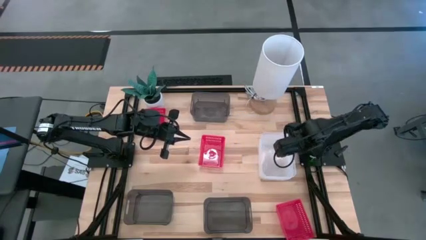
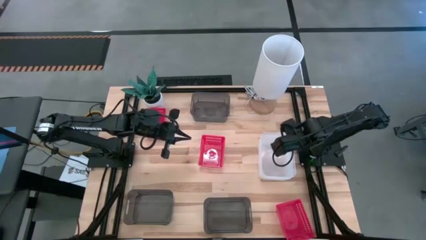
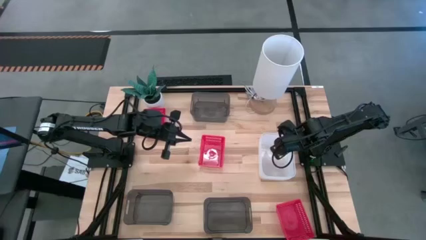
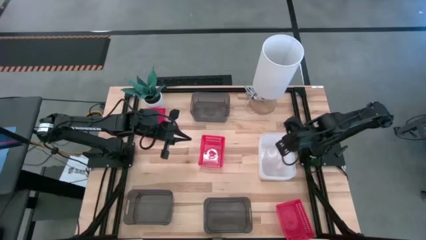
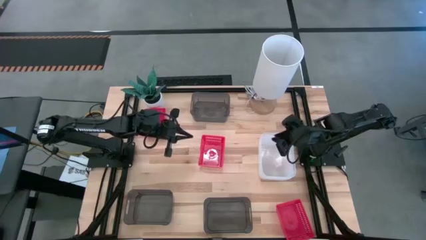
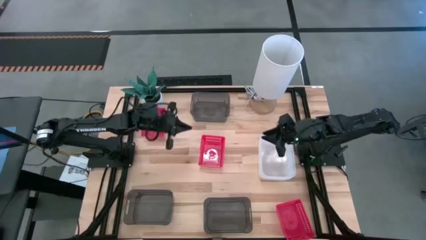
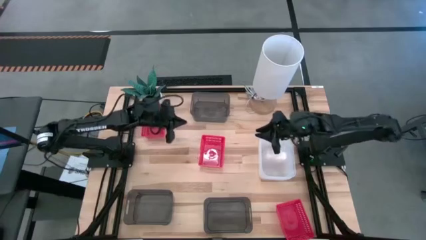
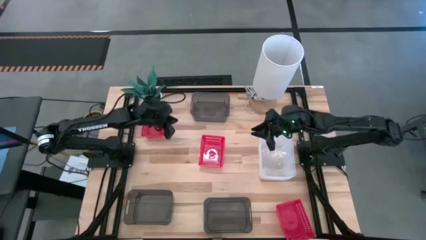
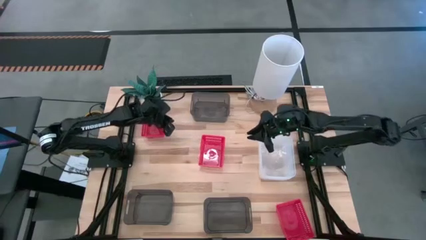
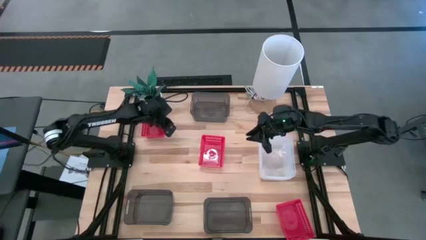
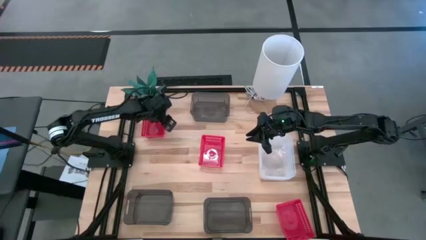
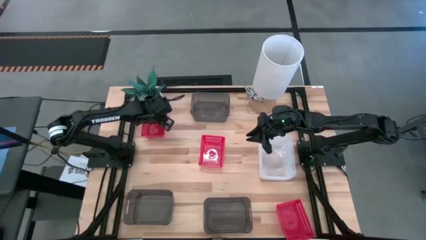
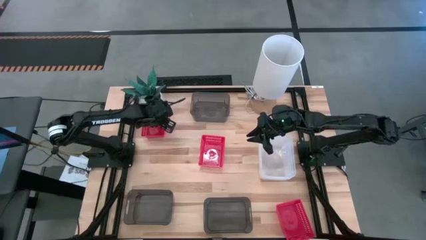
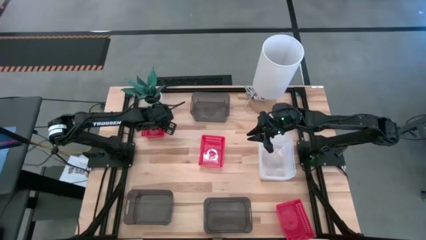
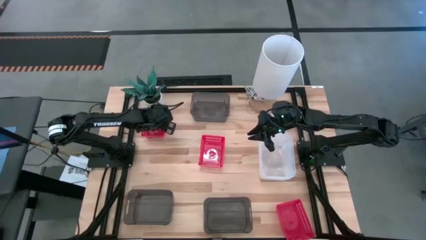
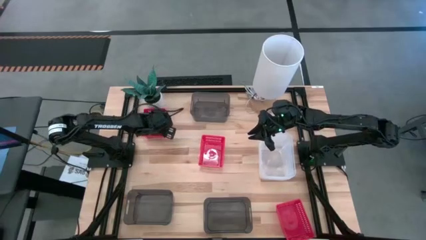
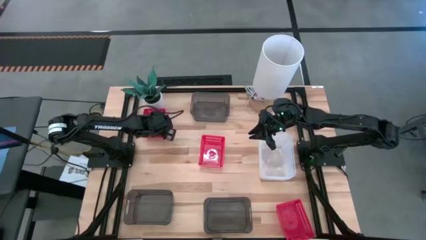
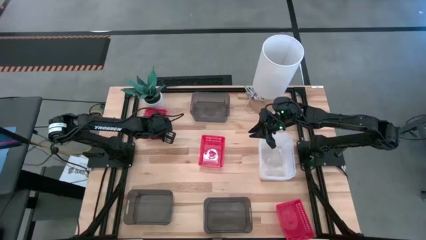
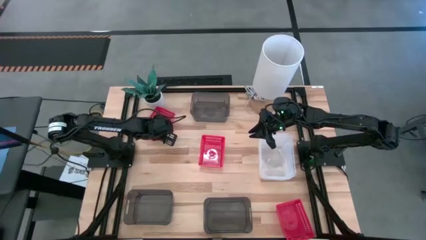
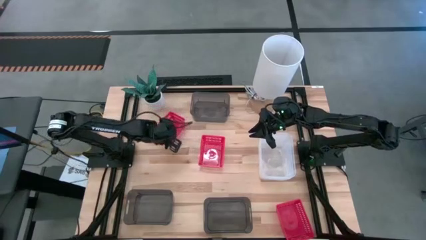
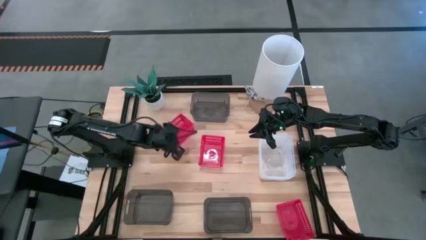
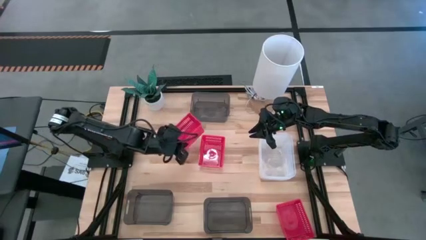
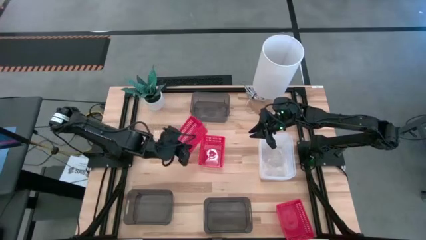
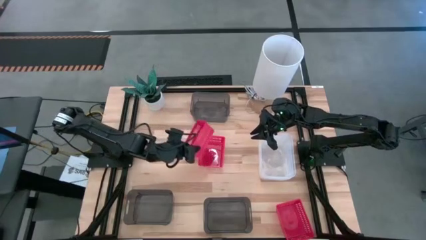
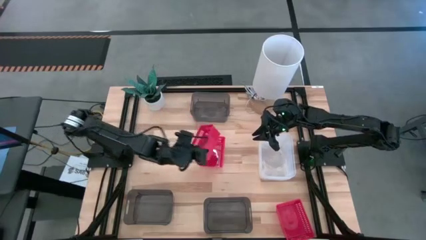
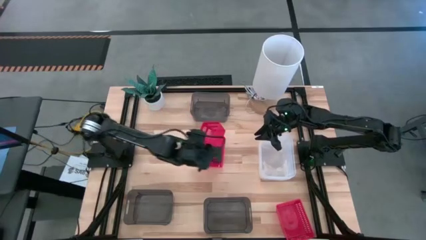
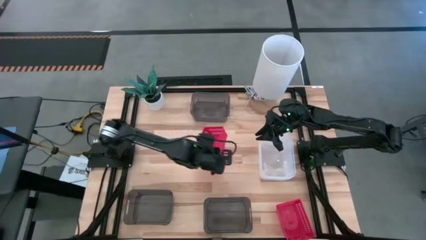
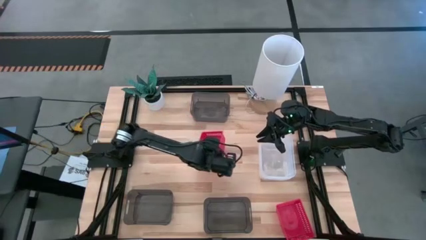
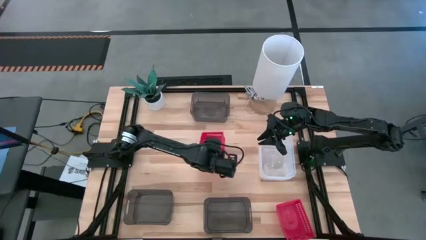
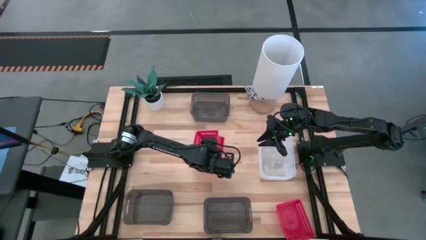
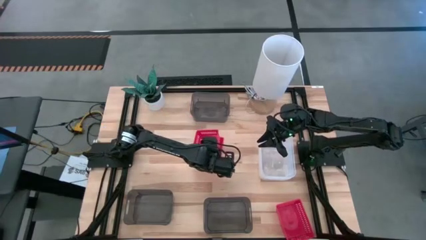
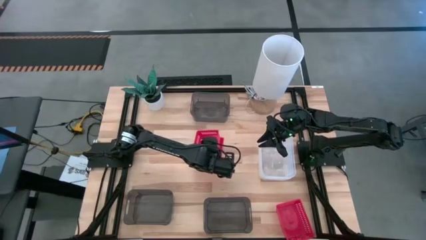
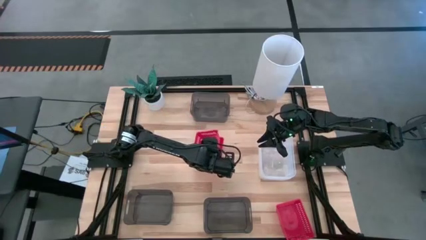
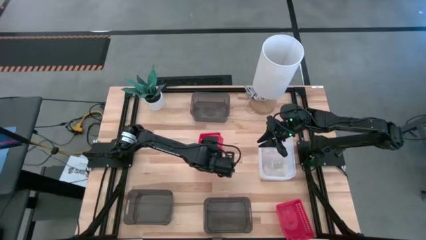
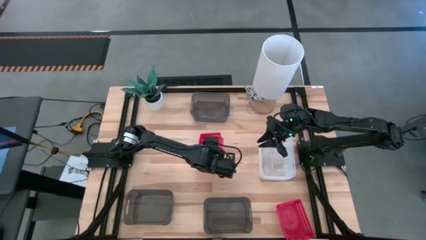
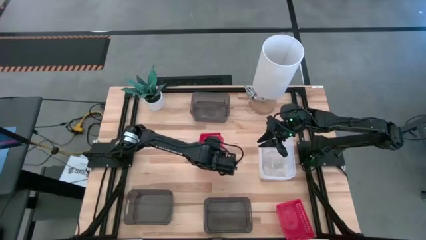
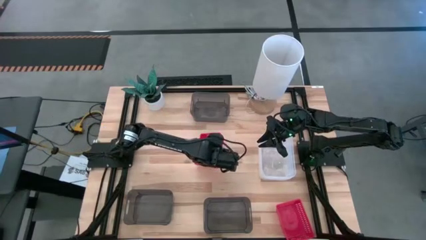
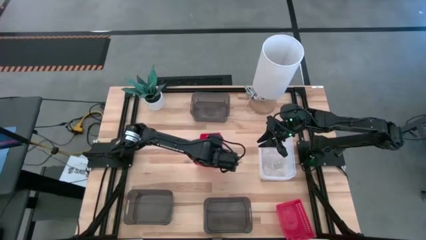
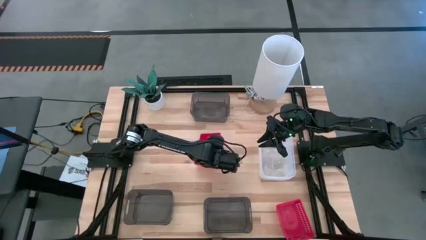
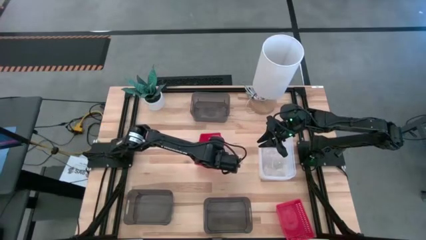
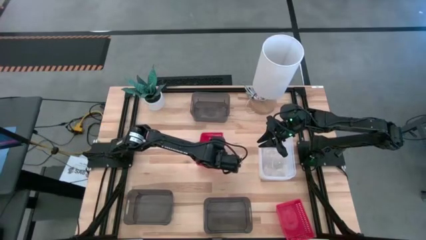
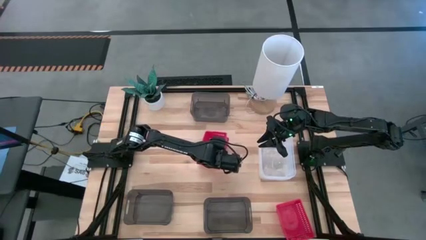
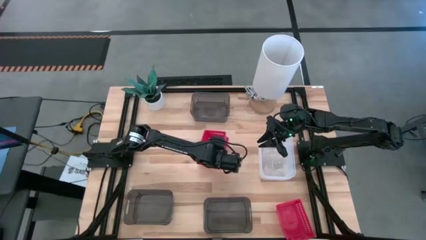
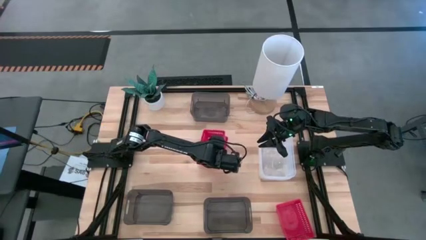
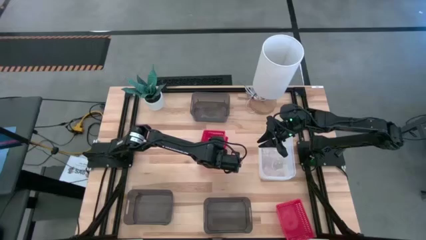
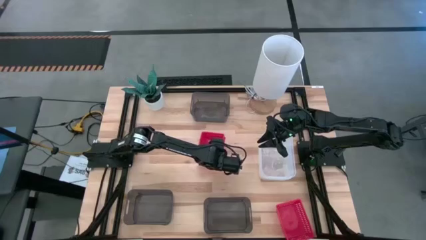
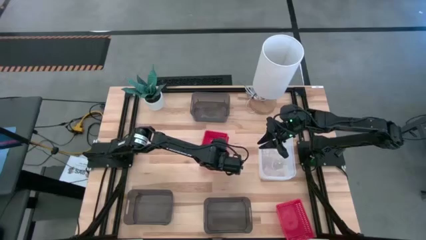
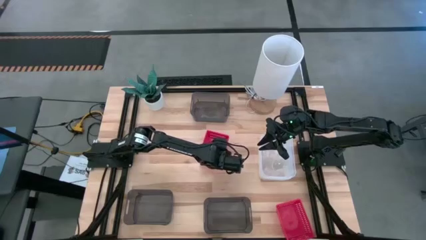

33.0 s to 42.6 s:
Stack the left red bin on top of the middle red bin

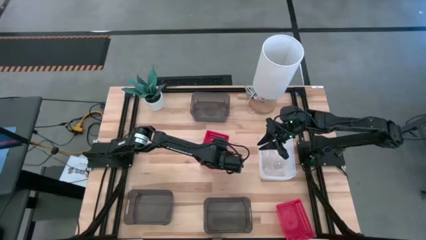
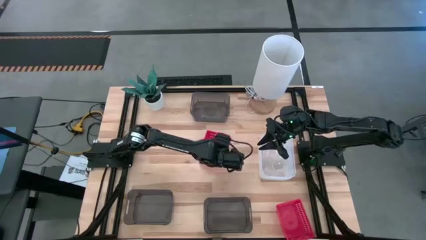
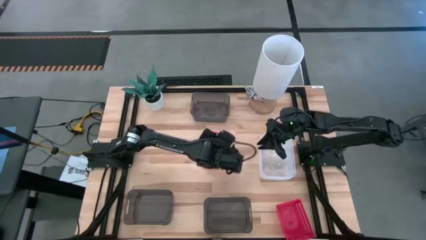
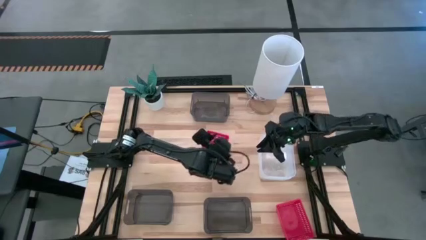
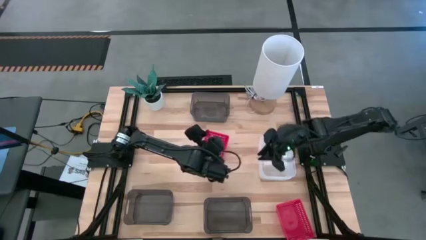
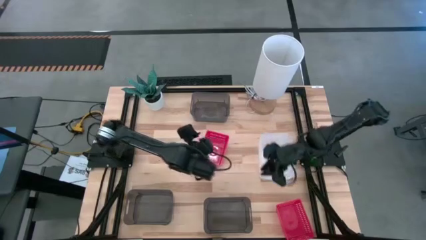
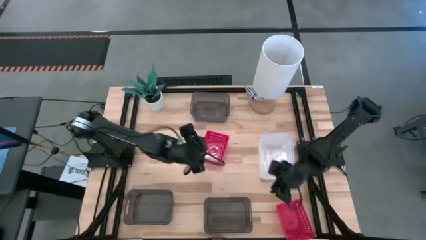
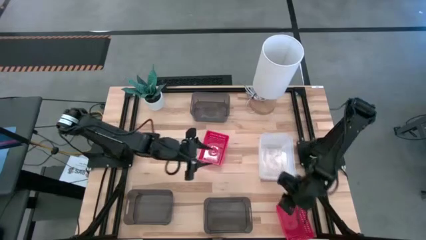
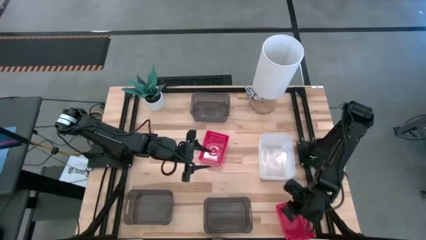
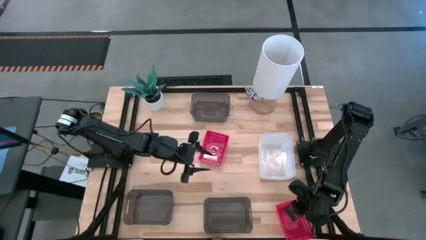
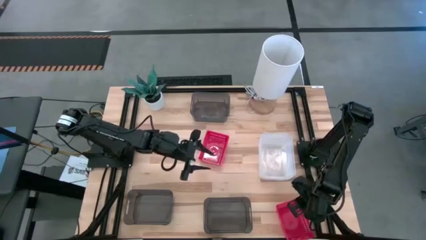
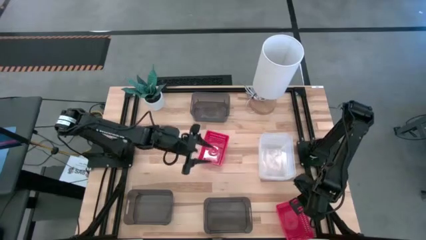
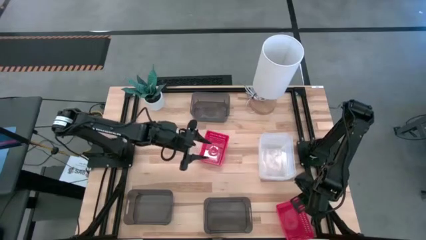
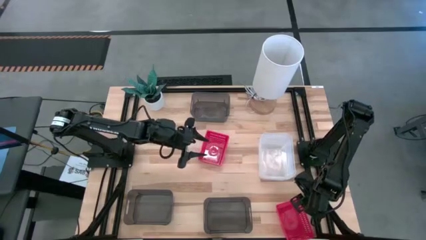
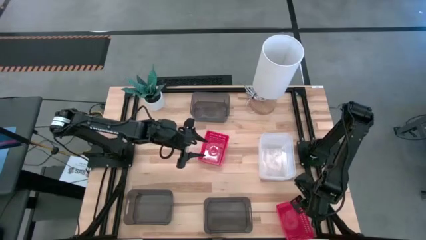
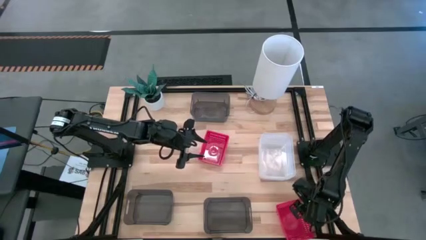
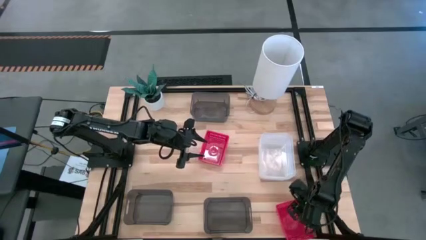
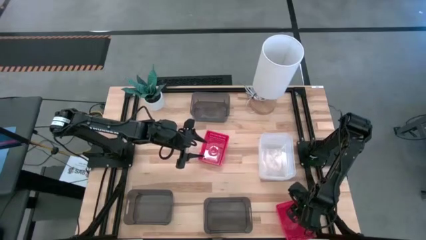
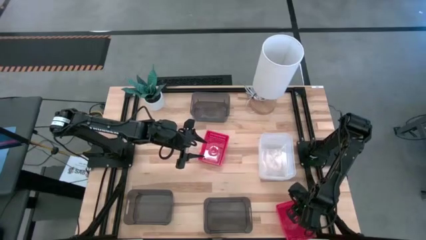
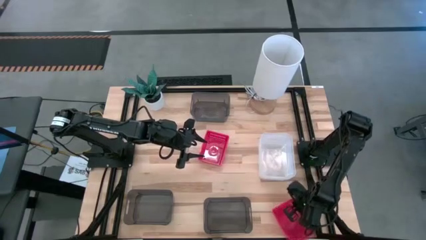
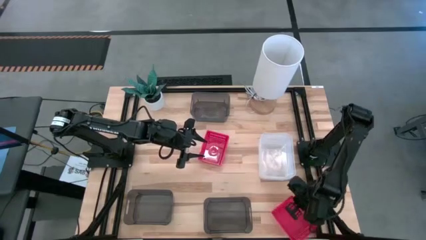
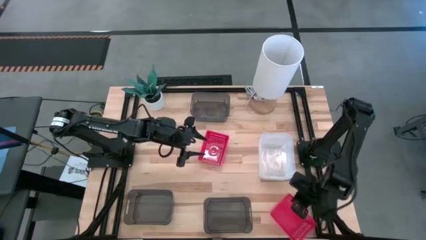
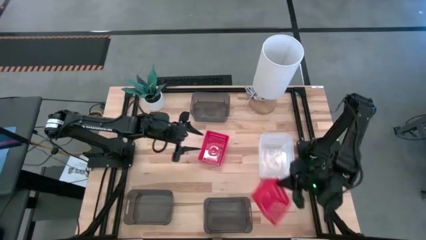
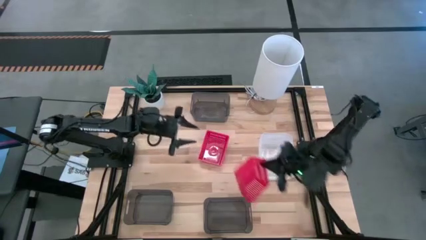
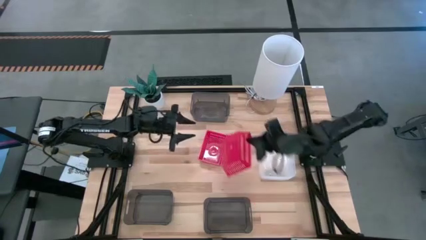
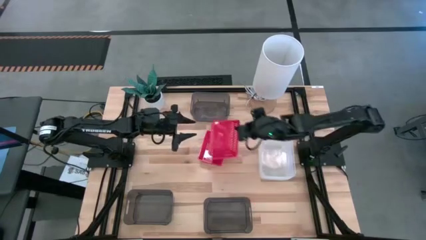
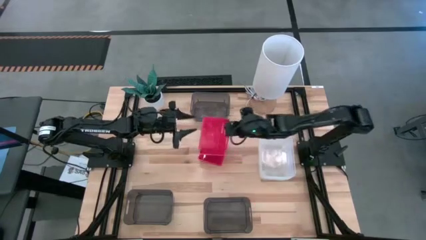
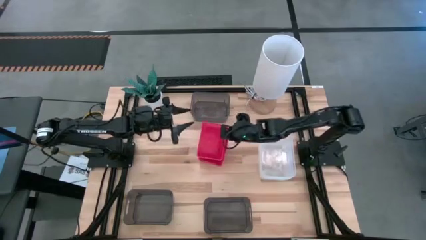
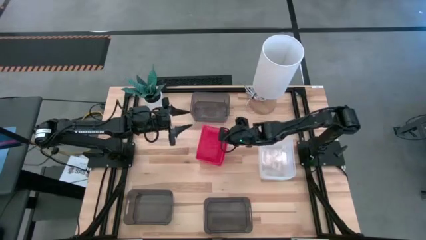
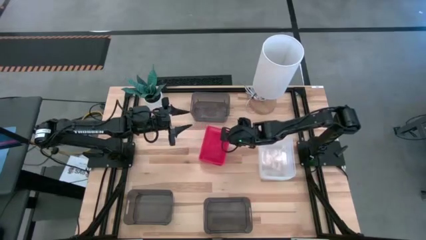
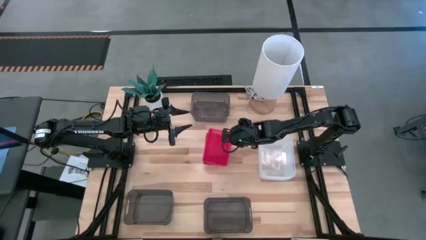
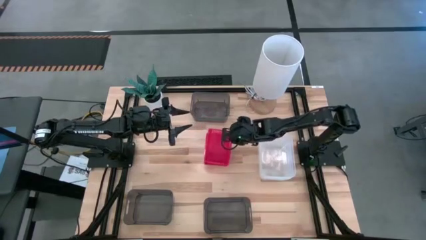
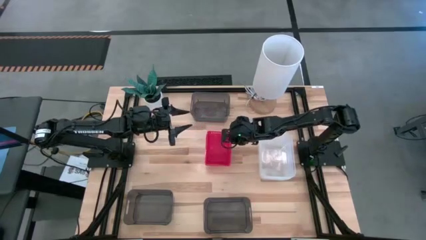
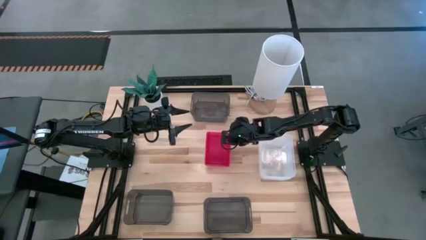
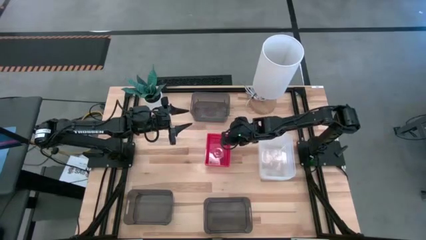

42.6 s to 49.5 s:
Stack the right red bin on top of the left red bin
